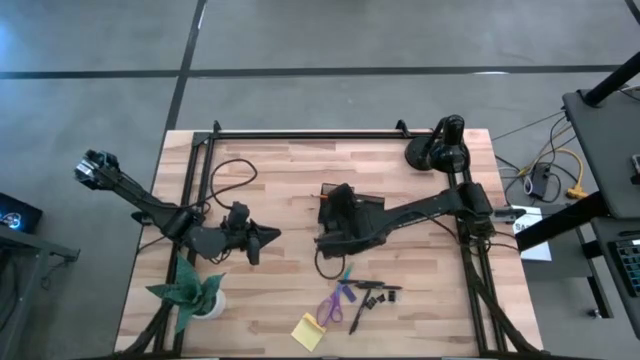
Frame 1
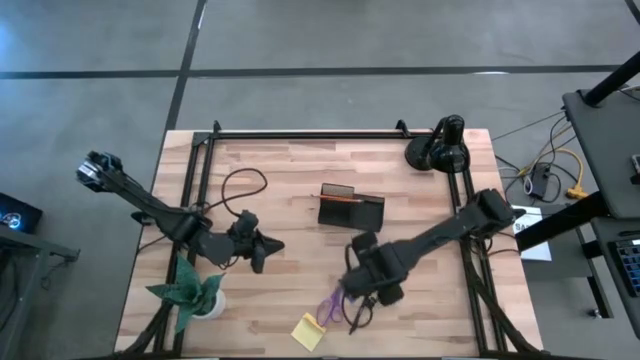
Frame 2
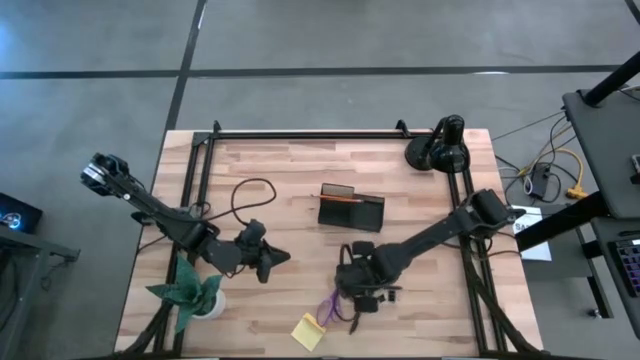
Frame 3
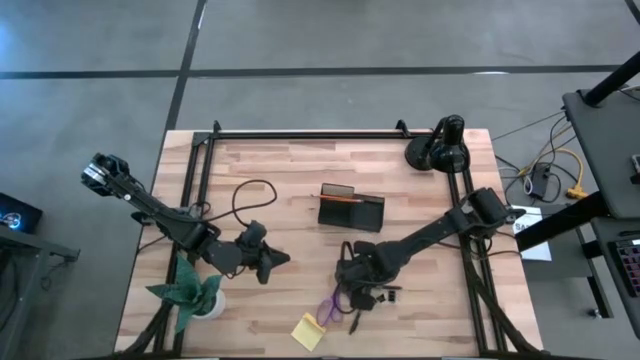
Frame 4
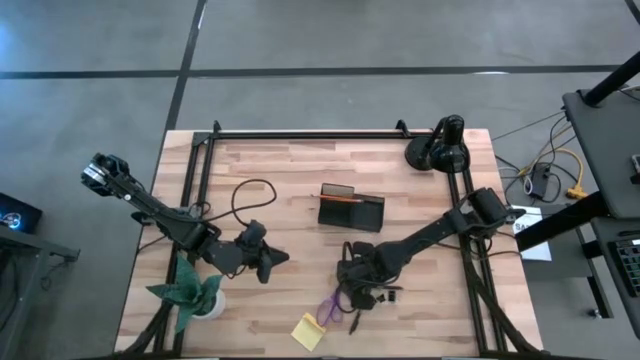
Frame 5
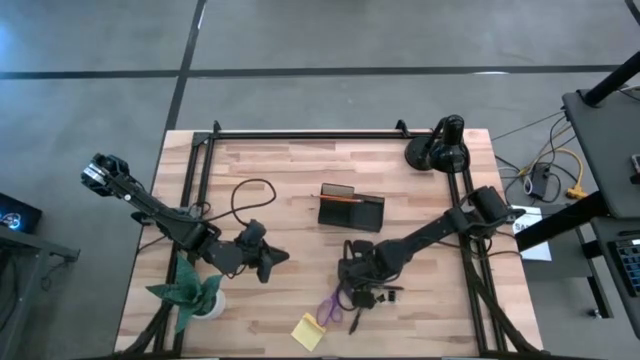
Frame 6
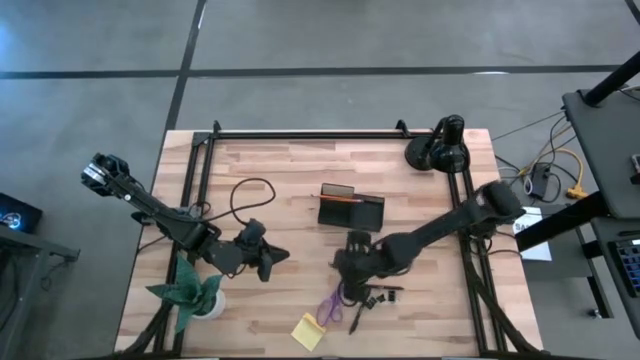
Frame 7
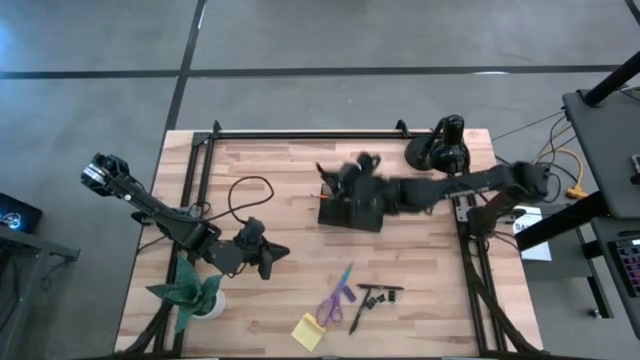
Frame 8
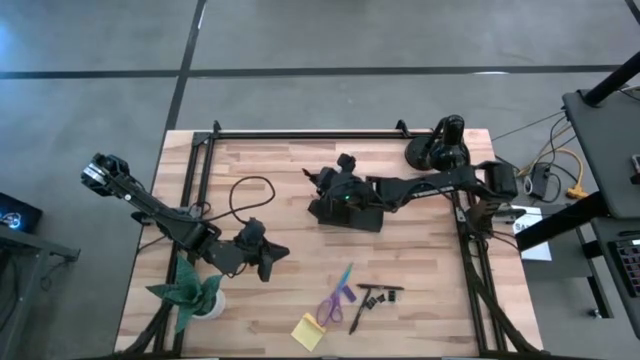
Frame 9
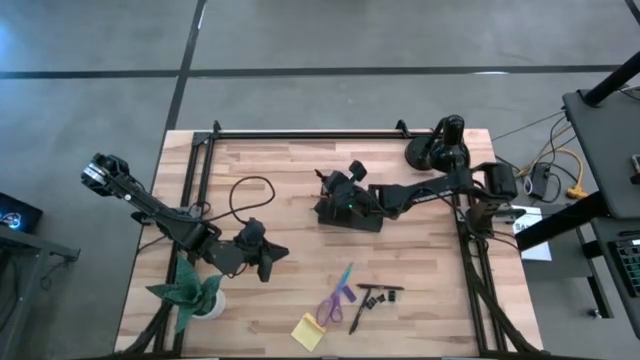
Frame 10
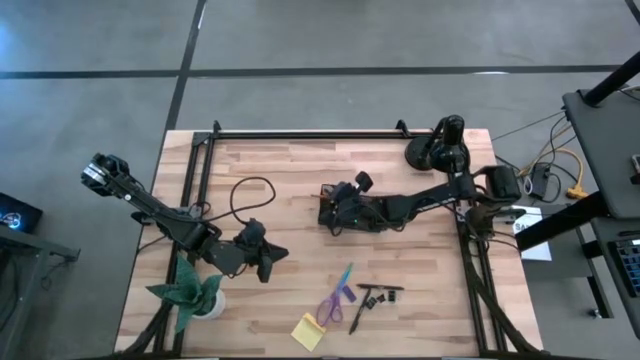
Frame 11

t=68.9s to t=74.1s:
Task: Pick and place office supplies into organizer
Put the top black pen into the black desk organizer

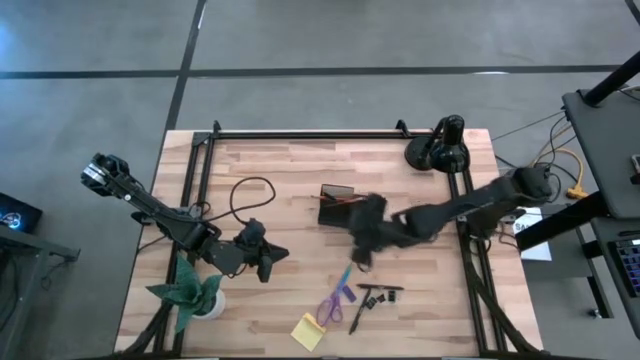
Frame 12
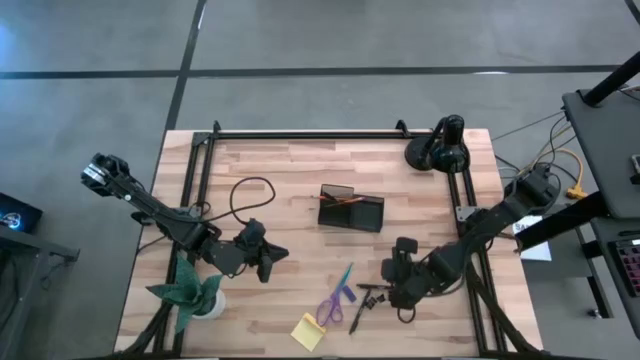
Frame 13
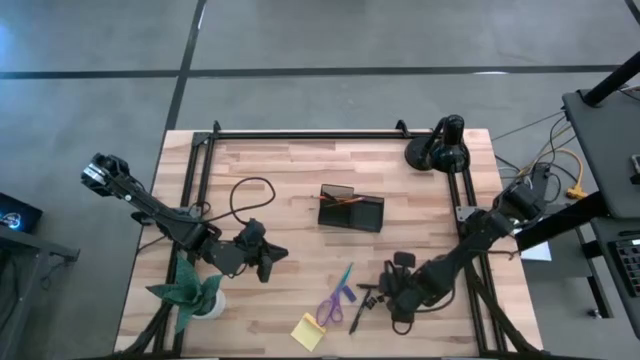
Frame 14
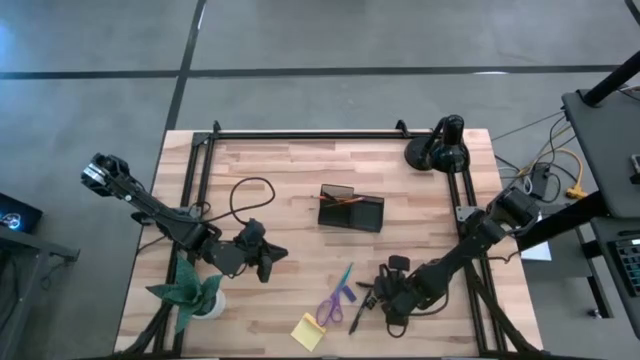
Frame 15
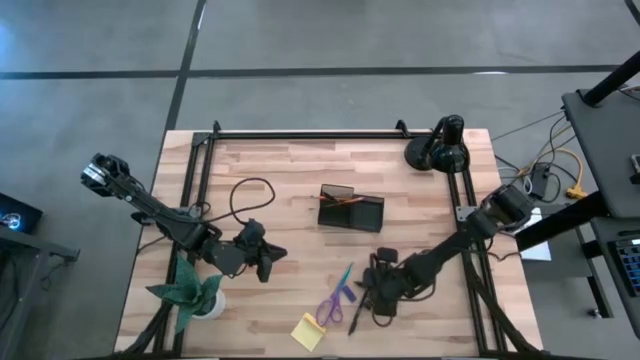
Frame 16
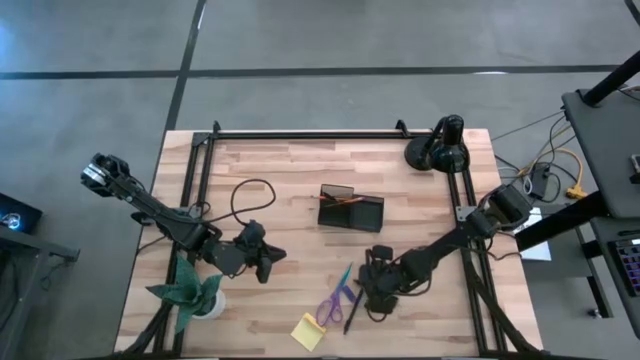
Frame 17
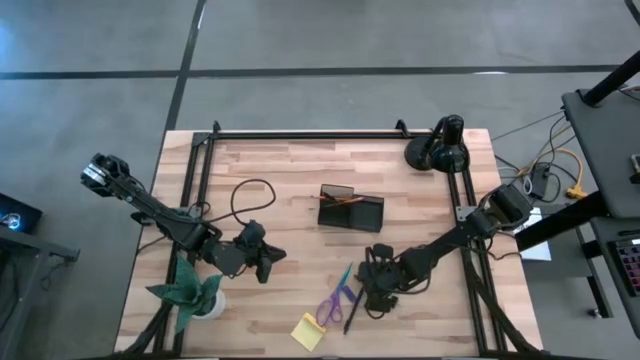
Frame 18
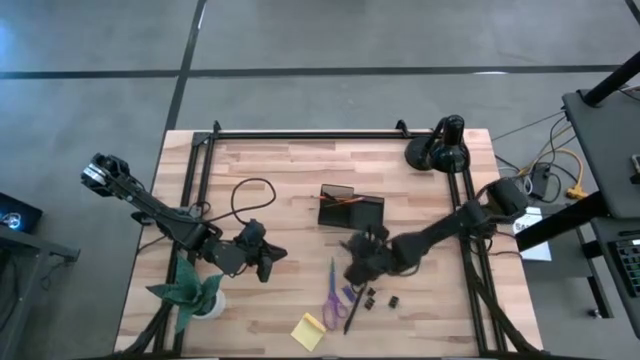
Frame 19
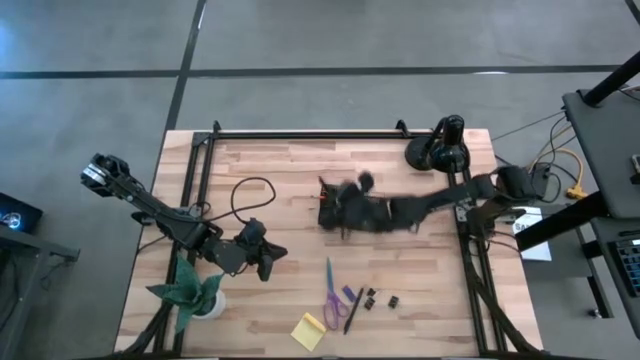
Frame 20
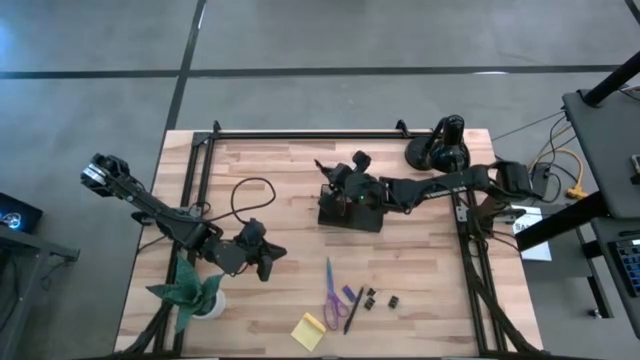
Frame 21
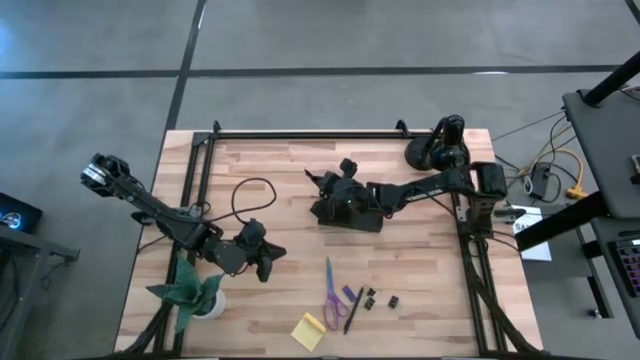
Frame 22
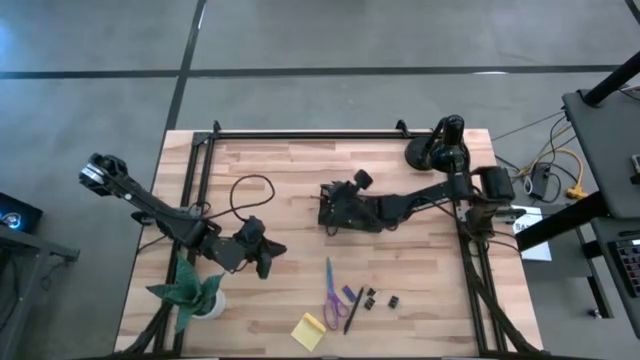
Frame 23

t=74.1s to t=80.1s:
Put the top black pen into the black desk organizer

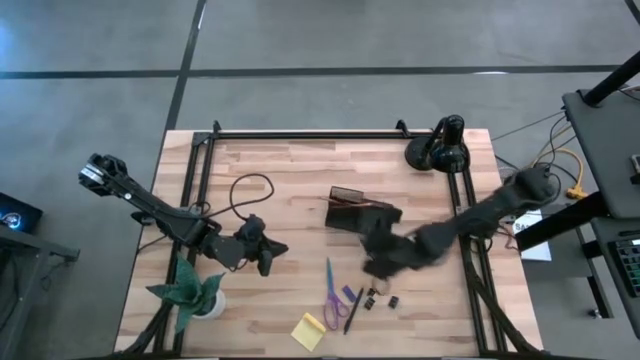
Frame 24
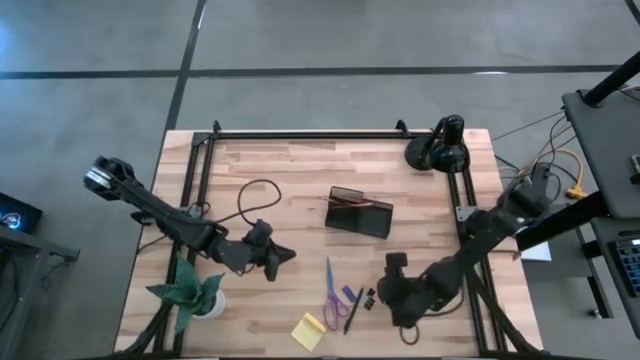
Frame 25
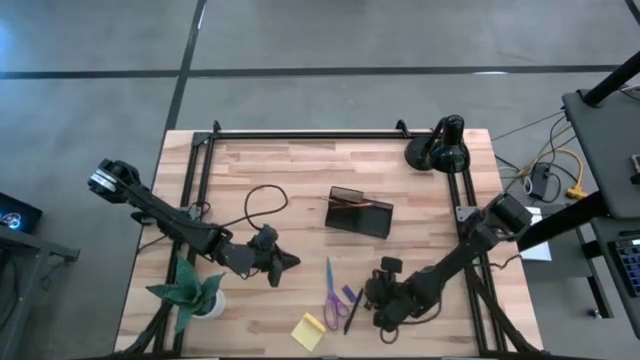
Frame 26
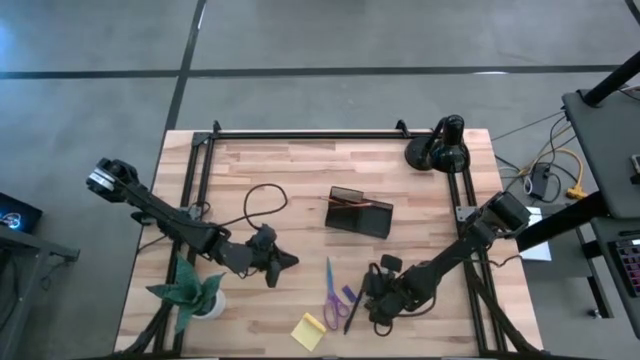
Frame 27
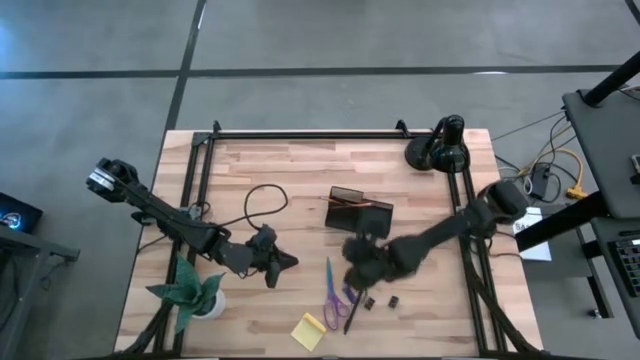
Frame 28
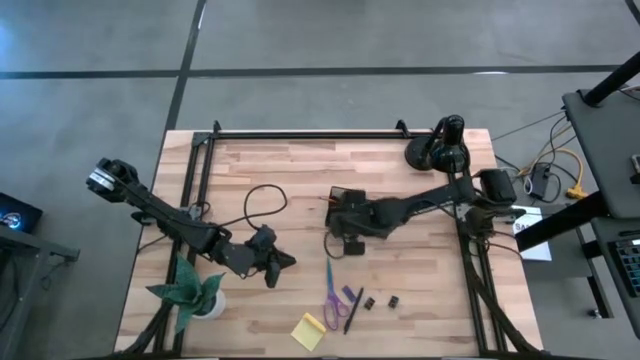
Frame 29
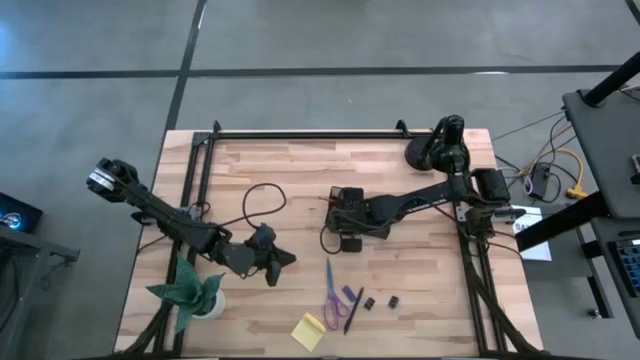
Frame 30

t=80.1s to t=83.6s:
Put the top black binder clip into the black desk organizer

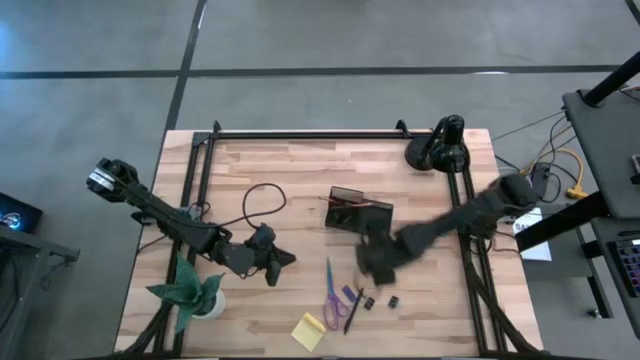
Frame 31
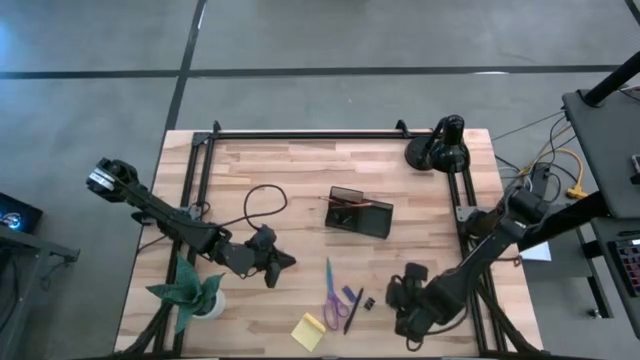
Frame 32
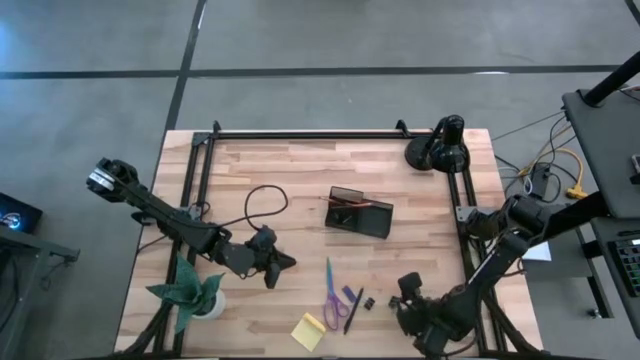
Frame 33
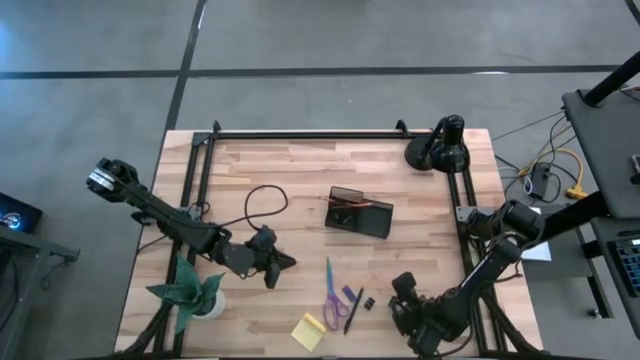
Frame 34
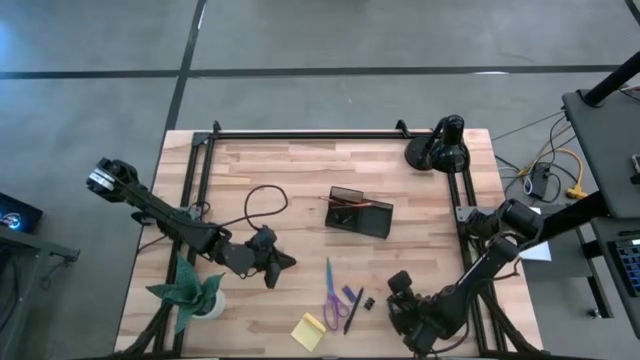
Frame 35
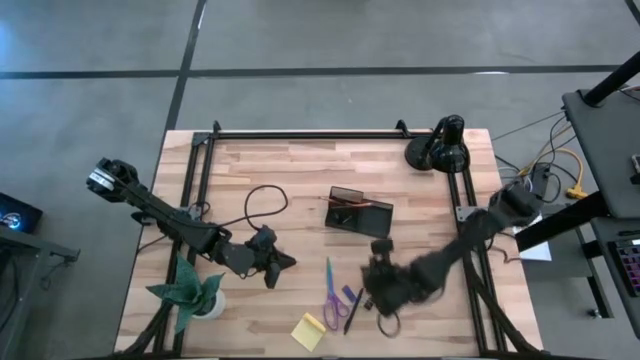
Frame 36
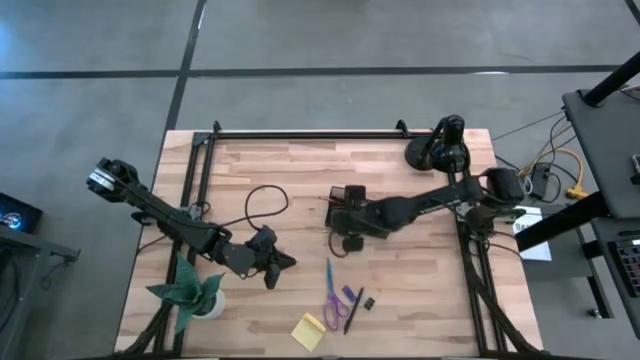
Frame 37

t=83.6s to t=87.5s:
Put the right black binder clip into the black desk organizer

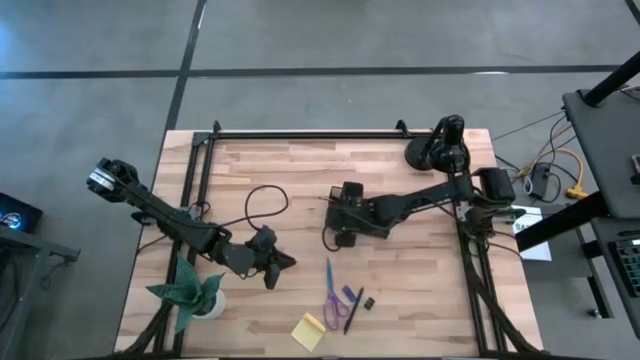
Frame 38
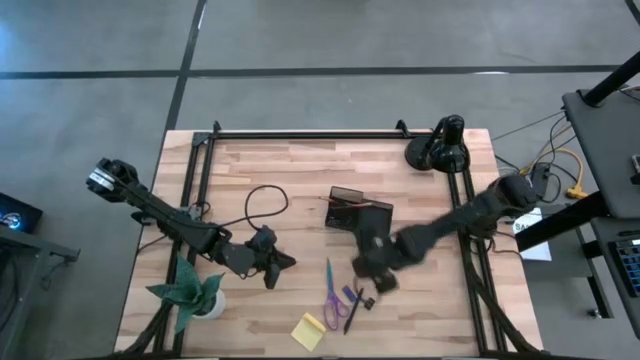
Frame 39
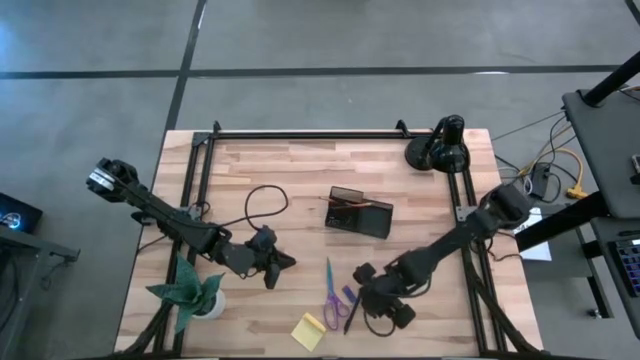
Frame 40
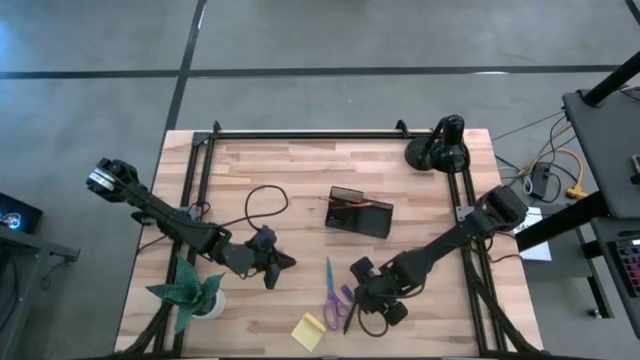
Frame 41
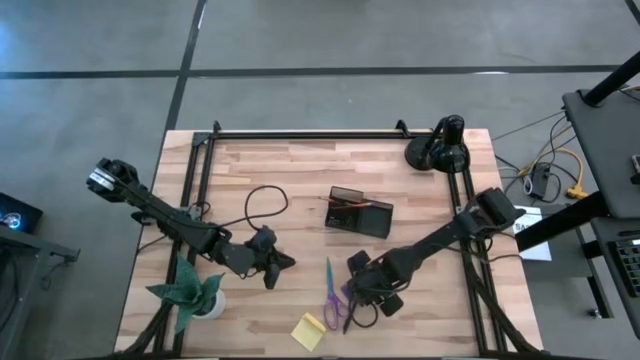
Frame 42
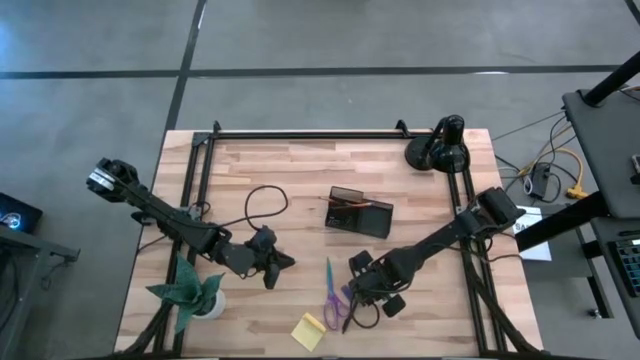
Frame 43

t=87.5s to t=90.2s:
Put the black binder clip into the black desk organizer
